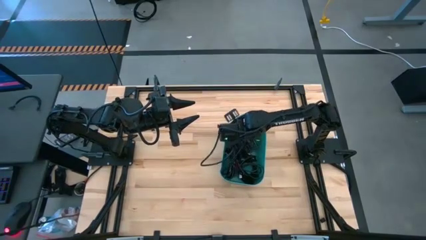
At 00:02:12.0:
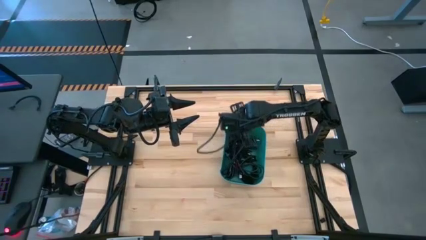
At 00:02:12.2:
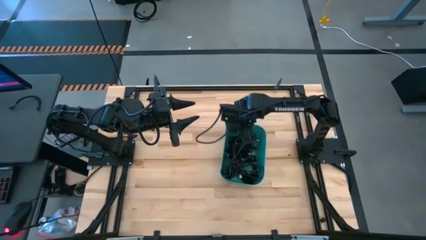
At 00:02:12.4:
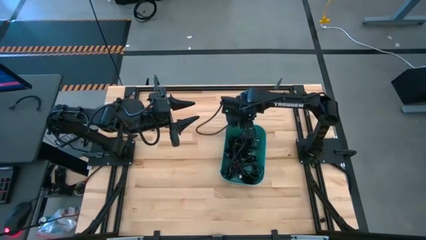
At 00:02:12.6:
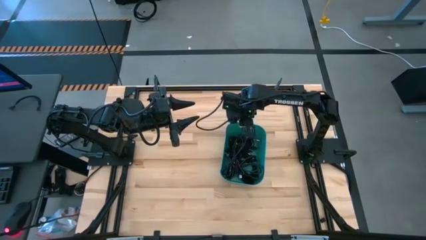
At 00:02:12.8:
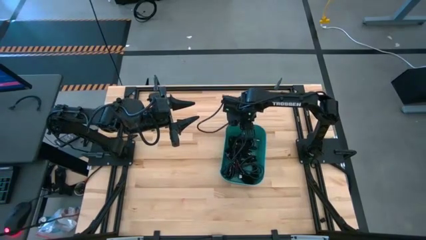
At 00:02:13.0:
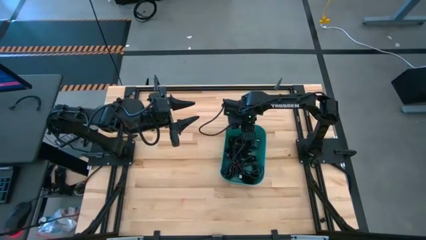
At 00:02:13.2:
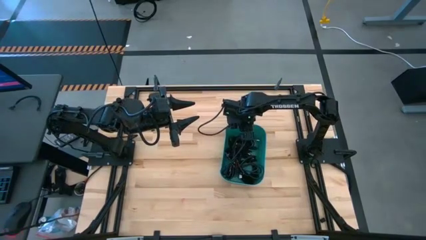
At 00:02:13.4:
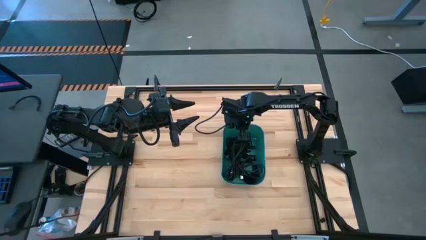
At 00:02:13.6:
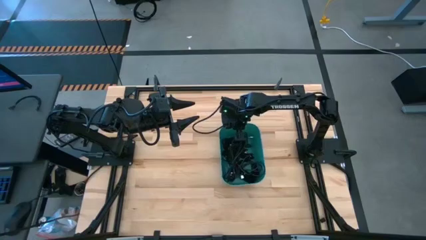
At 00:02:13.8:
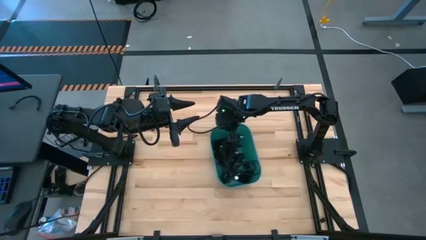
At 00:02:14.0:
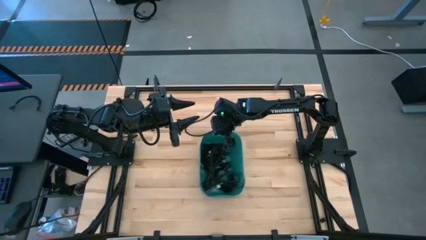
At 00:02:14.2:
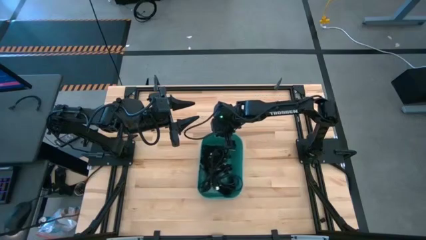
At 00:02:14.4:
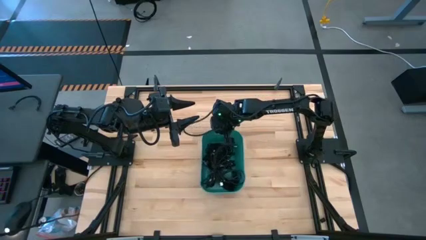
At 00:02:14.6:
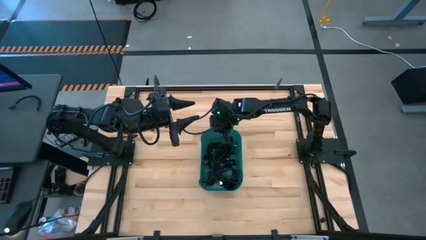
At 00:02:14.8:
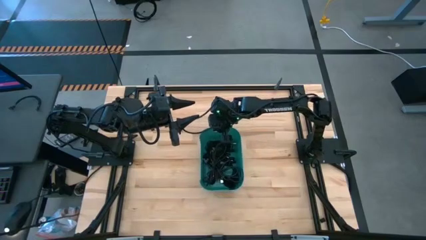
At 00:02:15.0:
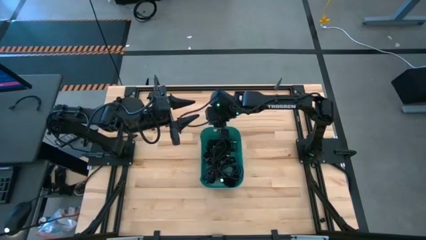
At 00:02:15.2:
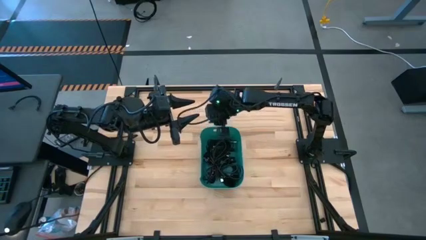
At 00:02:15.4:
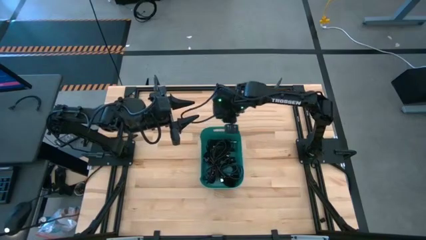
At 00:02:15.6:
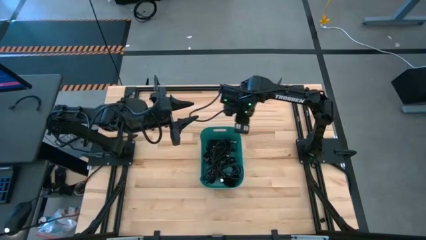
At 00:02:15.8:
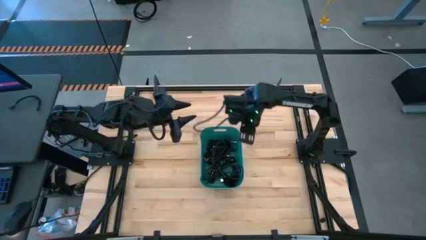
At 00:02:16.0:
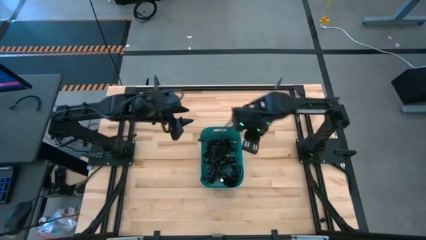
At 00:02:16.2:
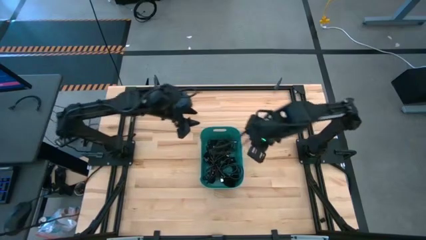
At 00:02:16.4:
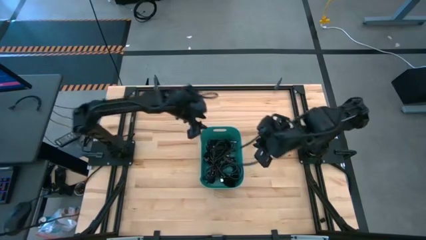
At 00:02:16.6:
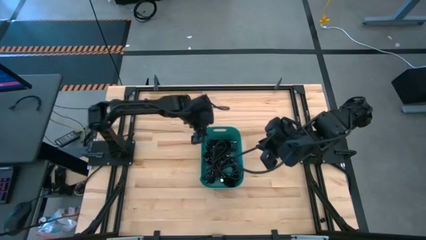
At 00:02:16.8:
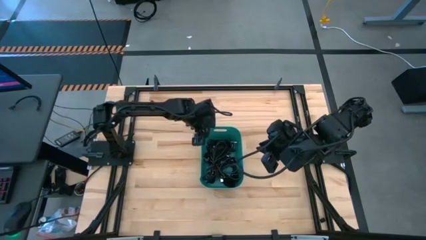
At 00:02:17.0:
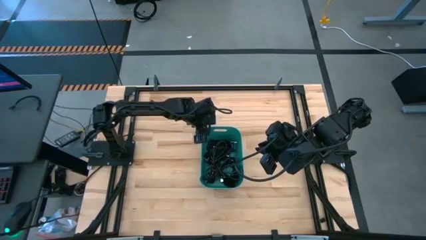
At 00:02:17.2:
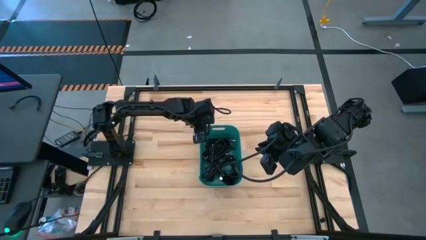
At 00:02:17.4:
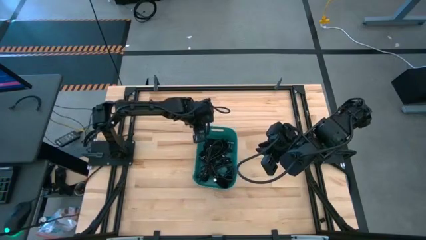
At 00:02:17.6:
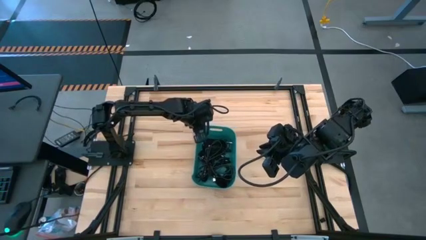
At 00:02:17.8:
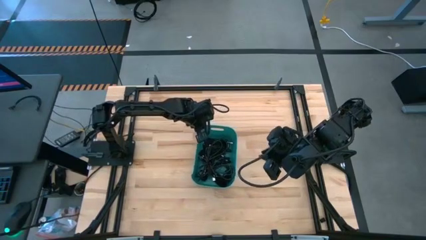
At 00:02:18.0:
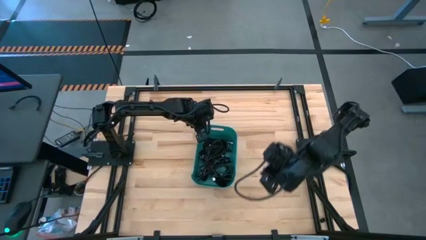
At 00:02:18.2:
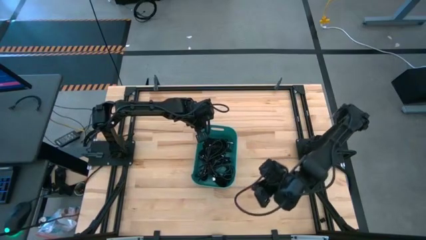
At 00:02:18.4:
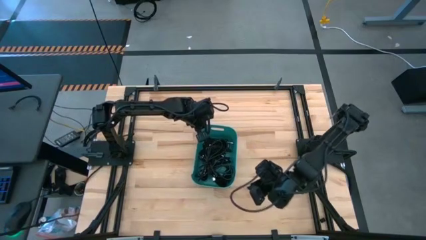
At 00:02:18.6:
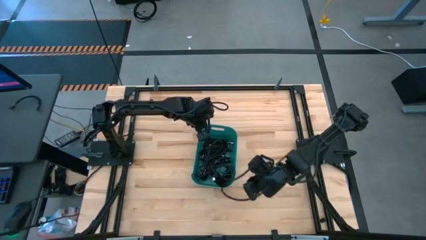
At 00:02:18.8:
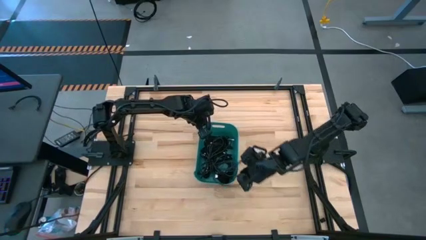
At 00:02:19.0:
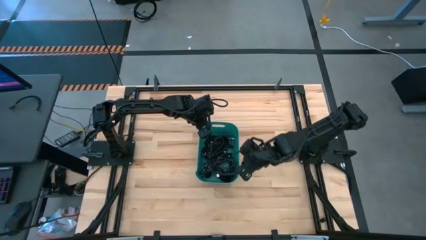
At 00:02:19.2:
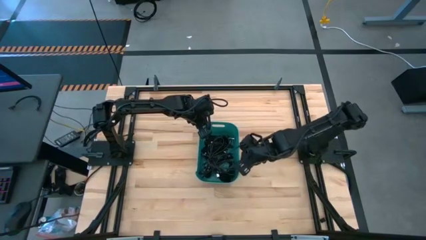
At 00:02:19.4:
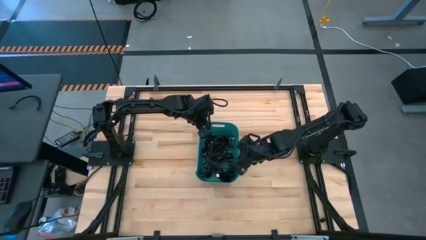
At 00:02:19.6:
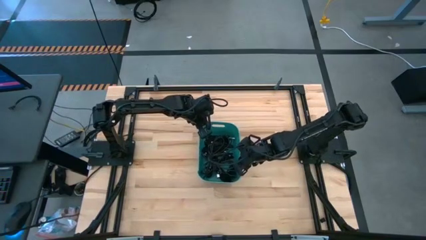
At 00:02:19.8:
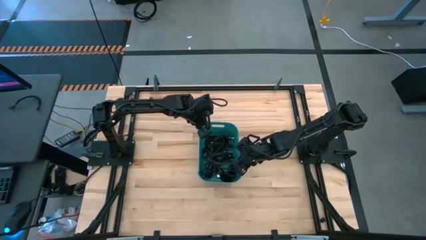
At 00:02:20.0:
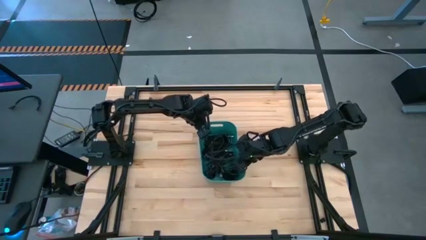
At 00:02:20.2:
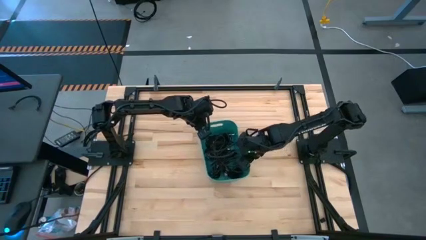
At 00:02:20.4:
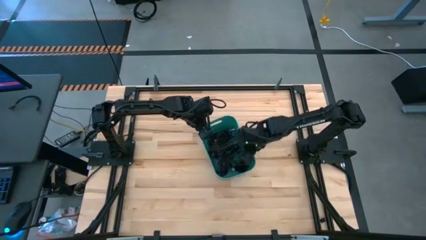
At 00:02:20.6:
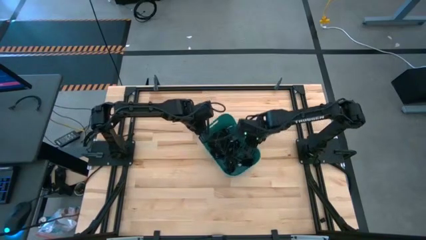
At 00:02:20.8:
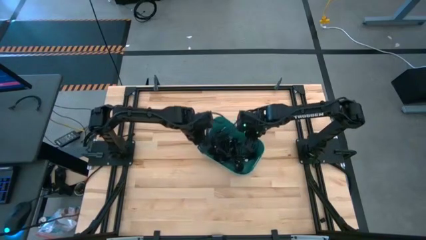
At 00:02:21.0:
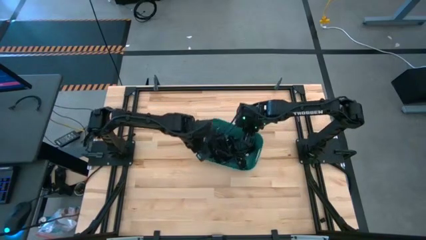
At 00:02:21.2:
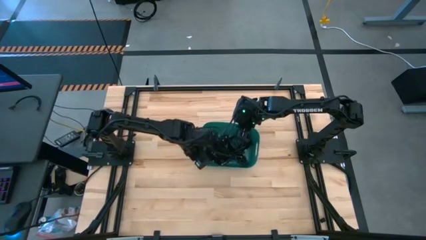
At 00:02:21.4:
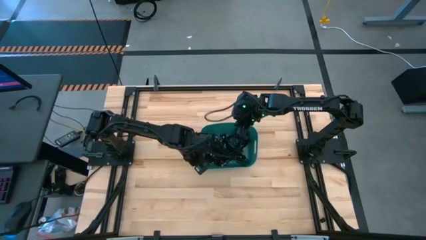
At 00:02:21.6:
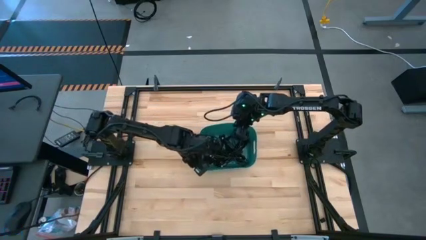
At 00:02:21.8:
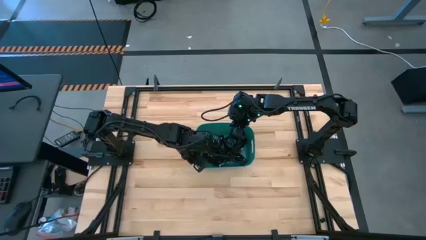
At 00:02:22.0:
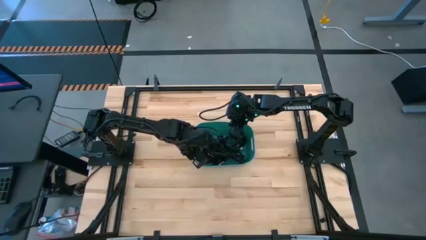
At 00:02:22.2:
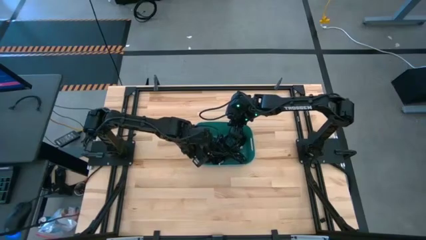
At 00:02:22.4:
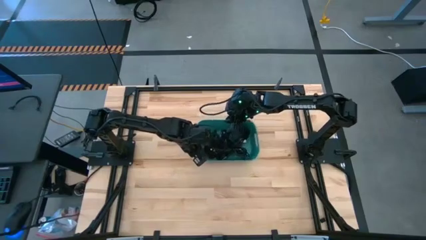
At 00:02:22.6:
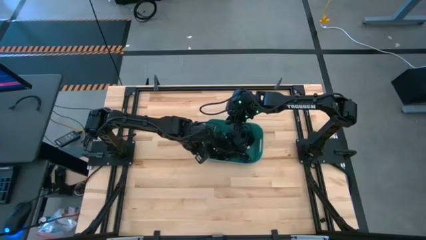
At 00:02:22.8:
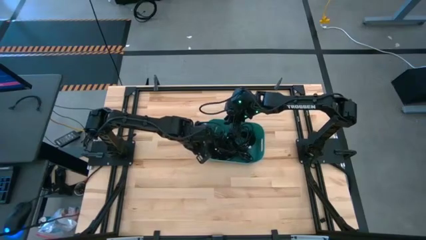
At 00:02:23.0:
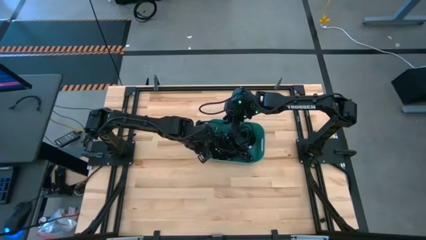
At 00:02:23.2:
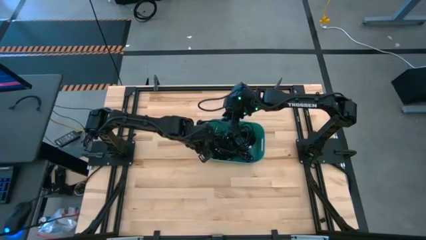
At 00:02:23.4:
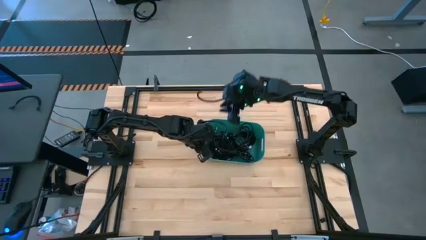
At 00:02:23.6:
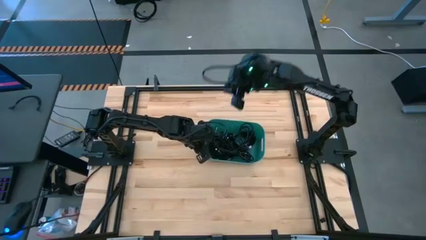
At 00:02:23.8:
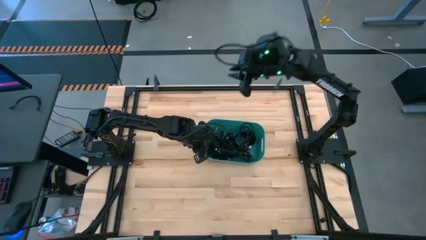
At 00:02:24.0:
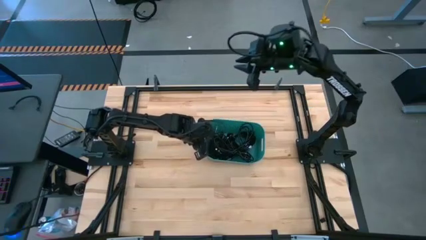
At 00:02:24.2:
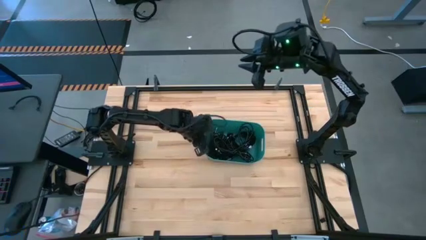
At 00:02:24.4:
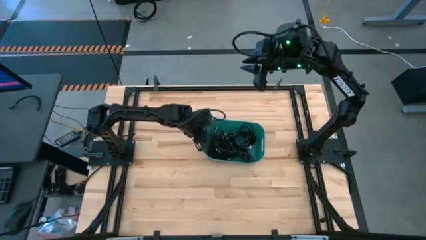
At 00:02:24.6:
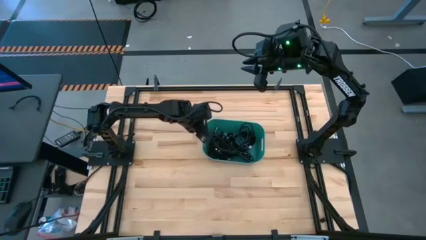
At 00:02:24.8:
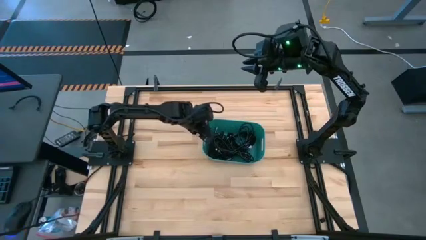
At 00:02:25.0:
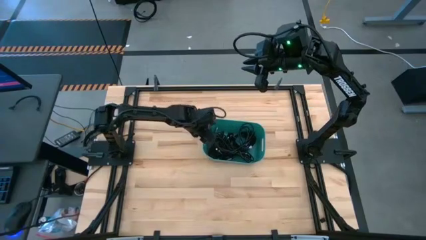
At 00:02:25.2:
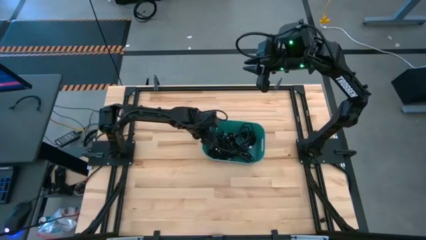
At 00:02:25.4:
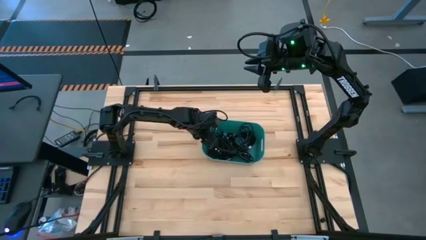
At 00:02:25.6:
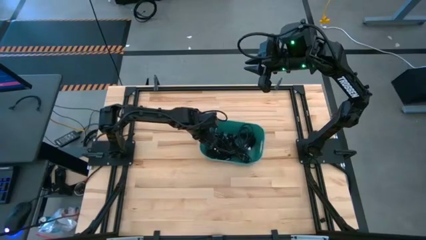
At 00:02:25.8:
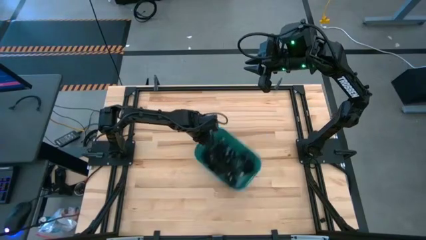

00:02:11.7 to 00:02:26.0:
Task: Pick and place USB-C Cables
Adjust the green bin

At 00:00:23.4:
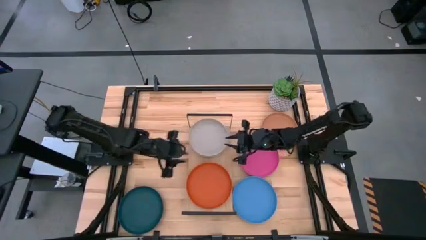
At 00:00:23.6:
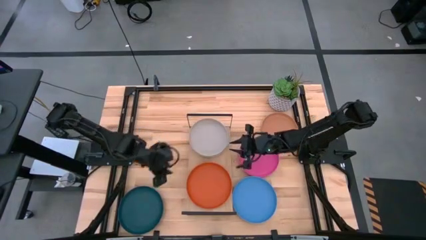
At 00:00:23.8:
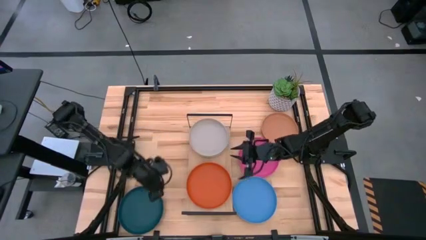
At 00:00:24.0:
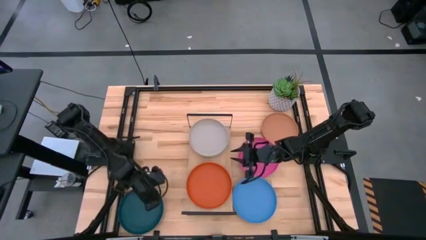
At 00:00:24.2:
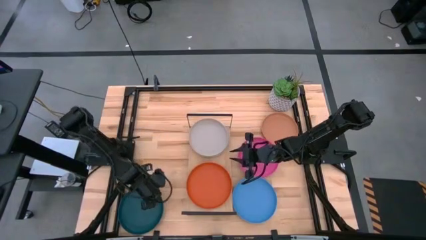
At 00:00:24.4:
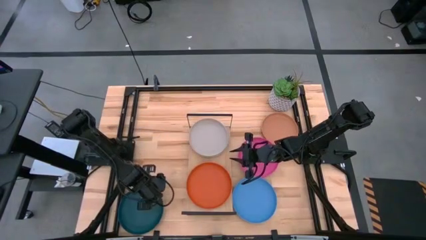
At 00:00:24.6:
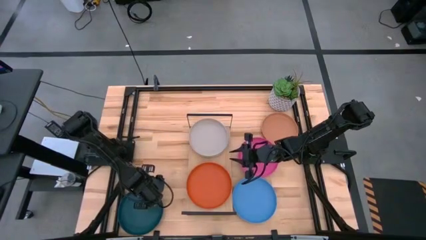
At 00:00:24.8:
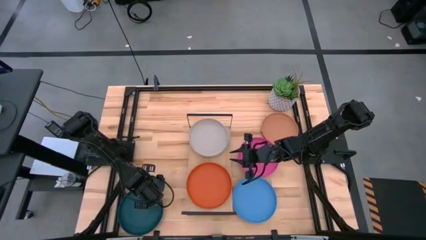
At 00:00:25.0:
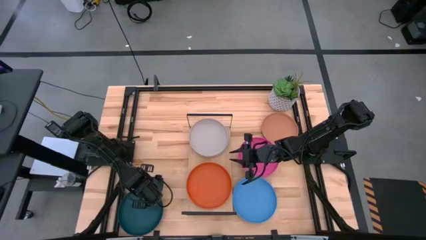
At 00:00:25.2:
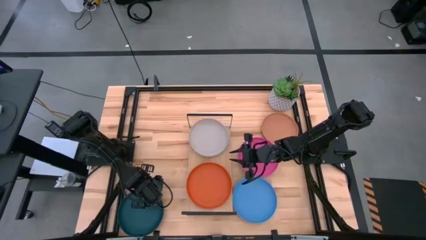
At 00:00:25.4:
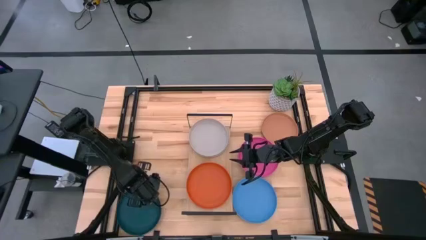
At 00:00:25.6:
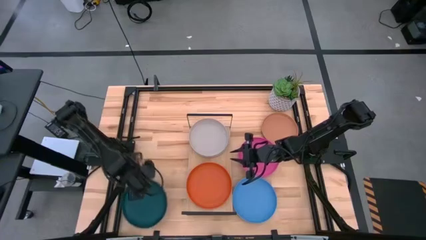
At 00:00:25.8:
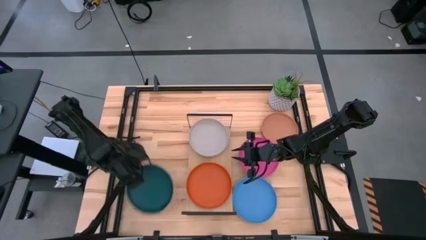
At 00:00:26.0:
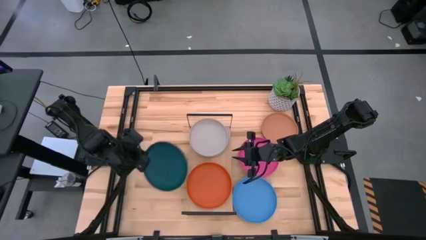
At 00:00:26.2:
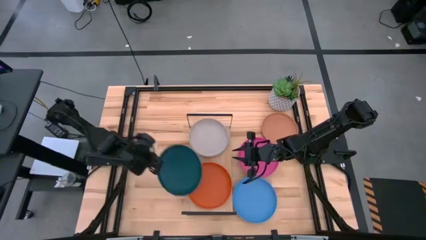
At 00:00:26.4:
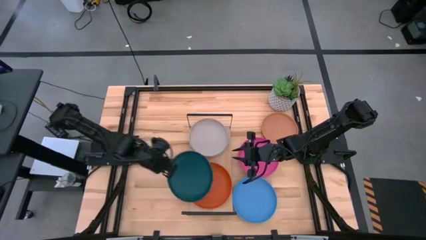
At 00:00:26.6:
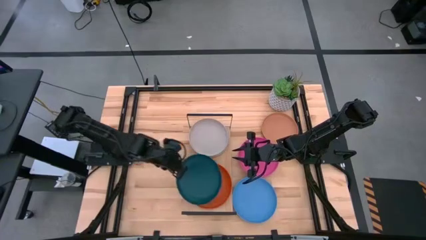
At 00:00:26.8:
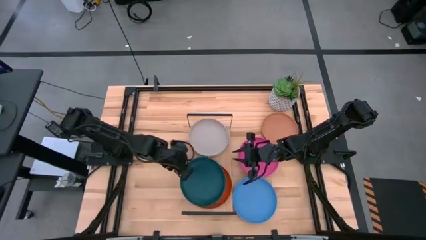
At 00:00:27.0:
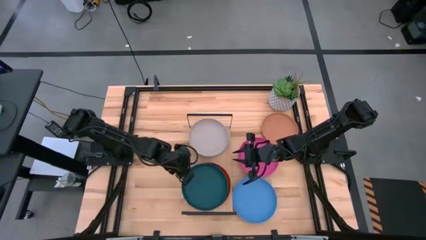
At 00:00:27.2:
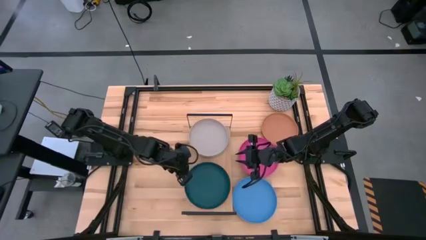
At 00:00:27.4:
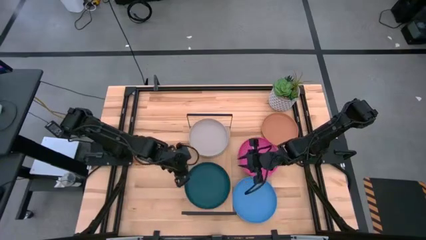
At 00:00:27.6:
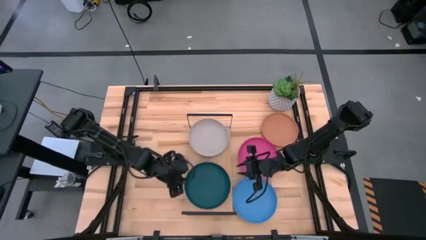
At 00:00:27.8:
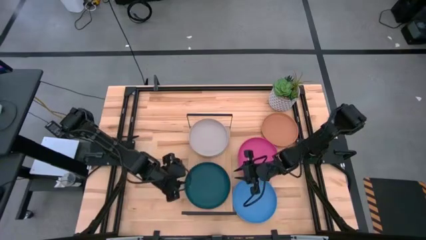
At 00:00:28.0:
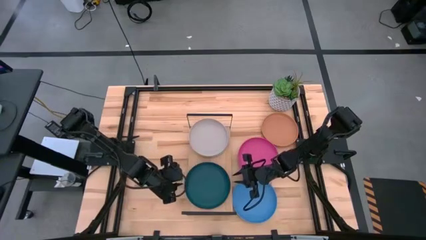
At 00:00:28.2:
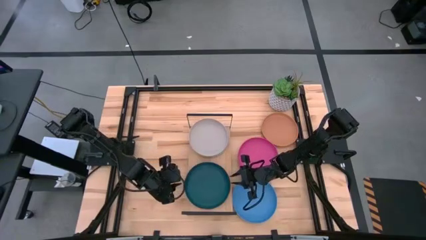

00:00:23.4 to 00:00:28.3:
Task: Place and stack plates onto a shelf
Stack the dark green plate on top of the orange plate on the shelf
